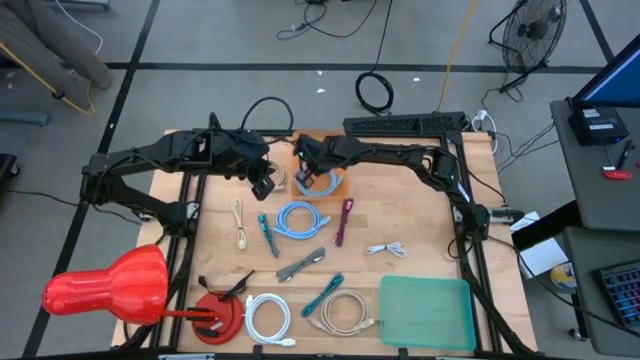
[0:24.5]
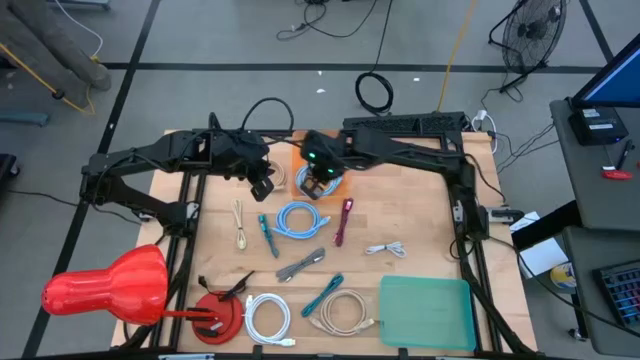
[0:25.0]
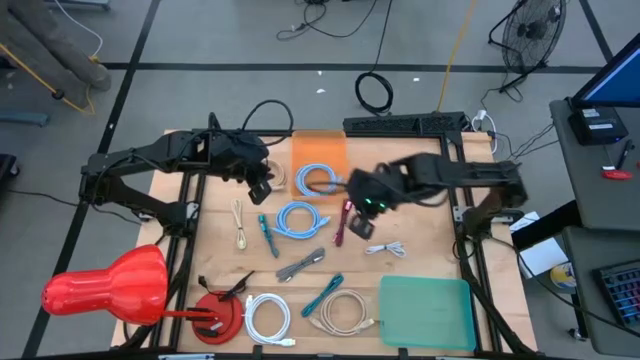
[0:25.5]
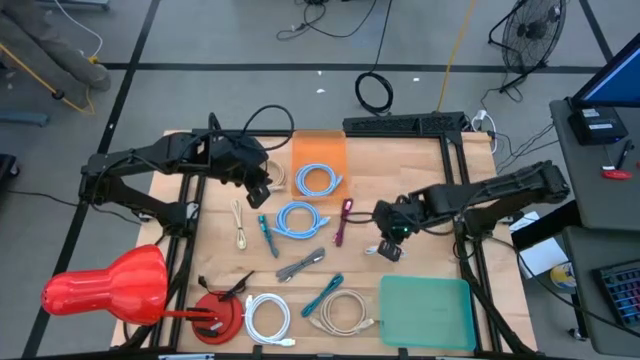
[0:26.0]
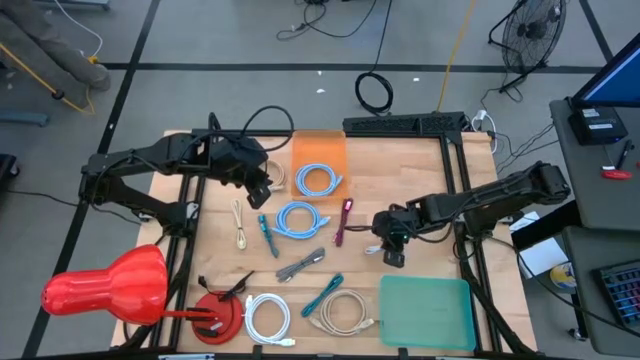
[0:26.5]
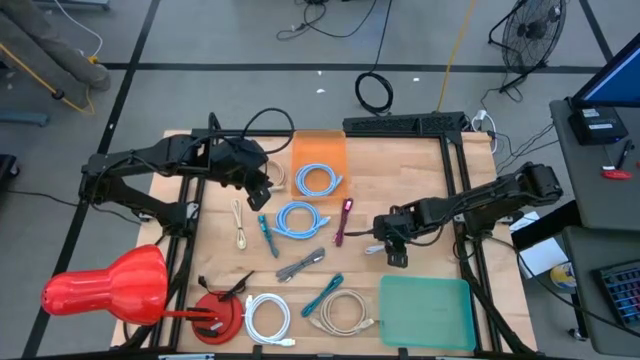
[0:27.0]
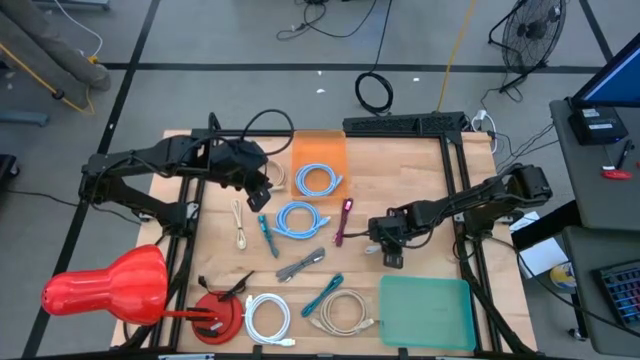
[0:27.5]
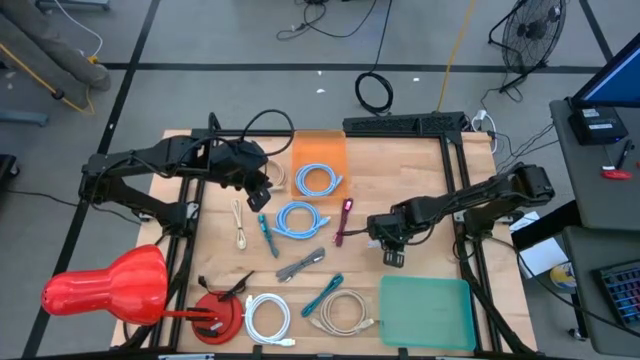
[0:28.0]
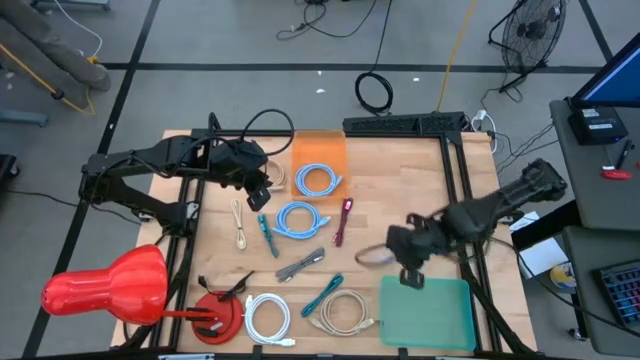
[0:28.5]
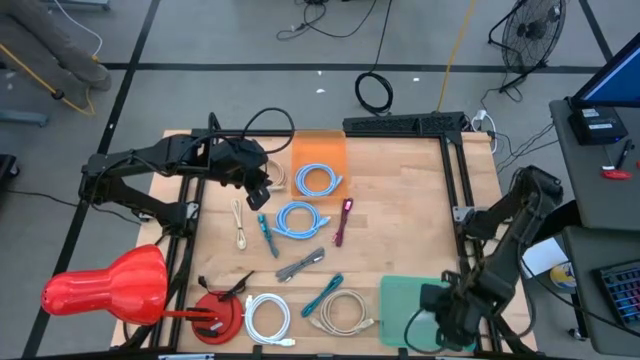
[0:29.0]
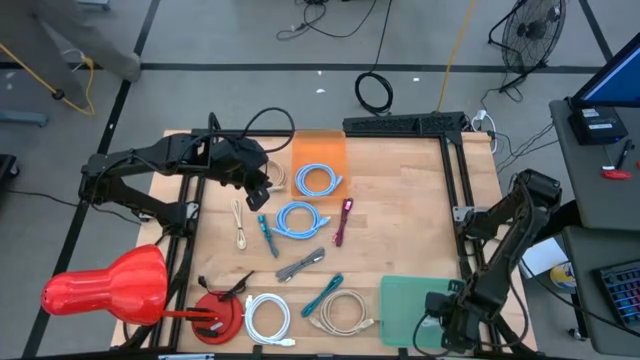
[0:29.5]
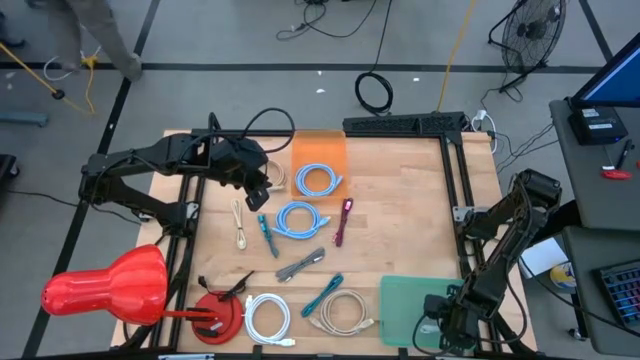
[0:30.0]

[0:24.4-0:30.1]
Task: Pick & Place USB Port
Put the top white usb cable into the blue bin

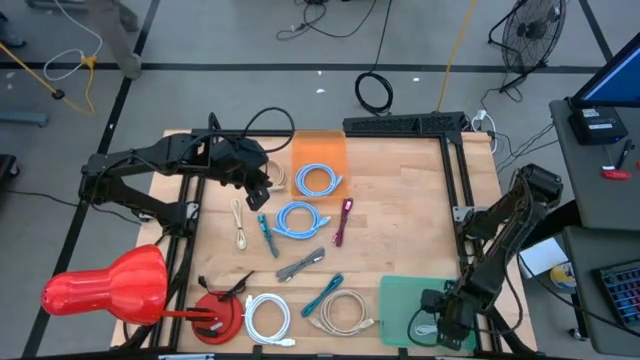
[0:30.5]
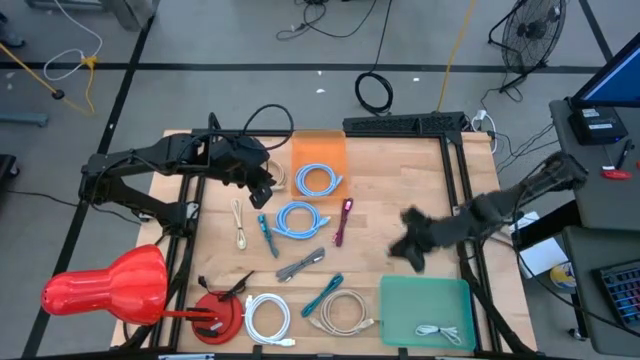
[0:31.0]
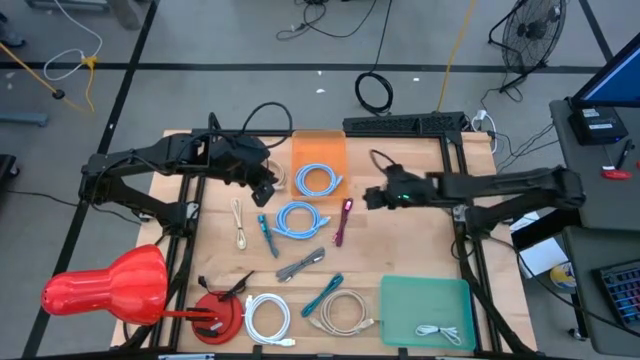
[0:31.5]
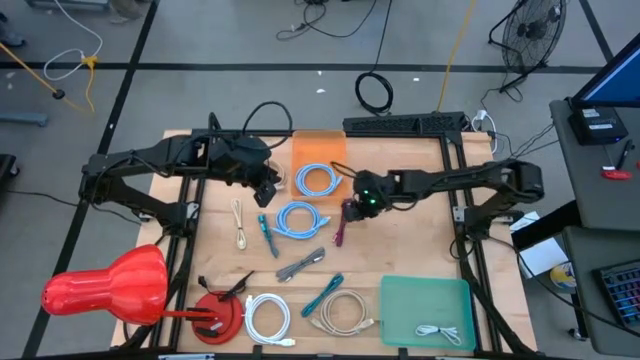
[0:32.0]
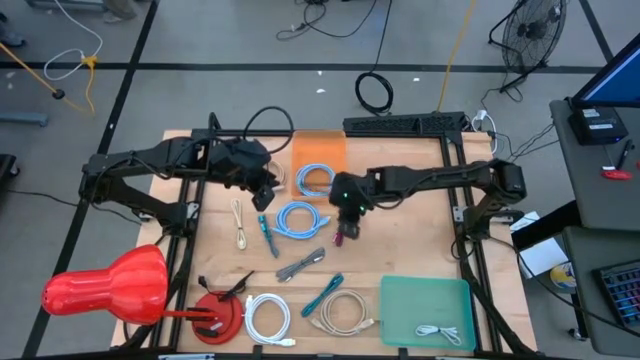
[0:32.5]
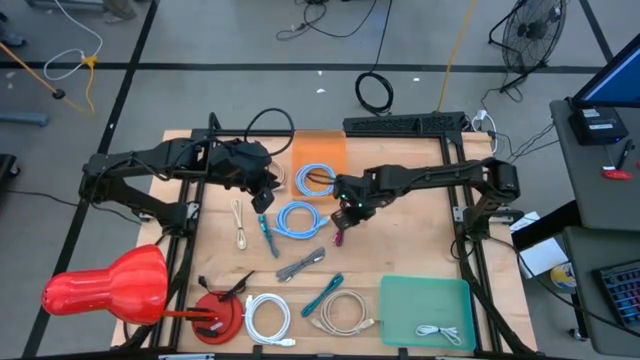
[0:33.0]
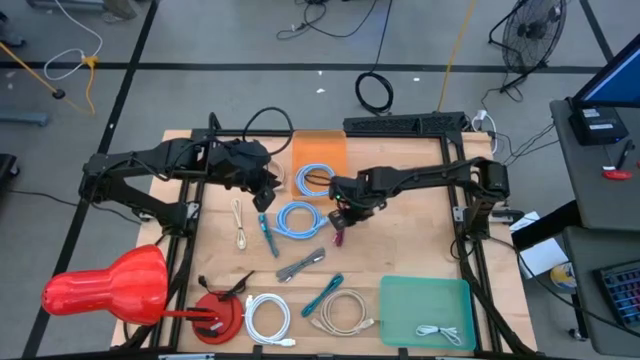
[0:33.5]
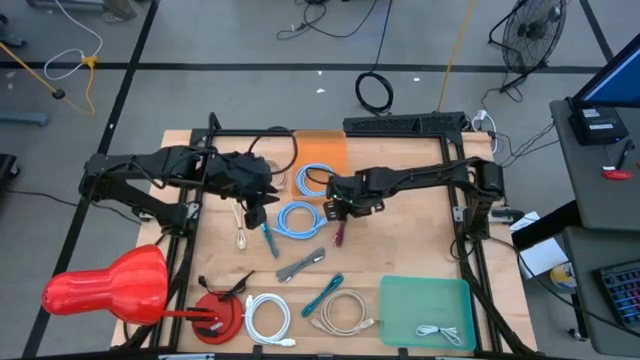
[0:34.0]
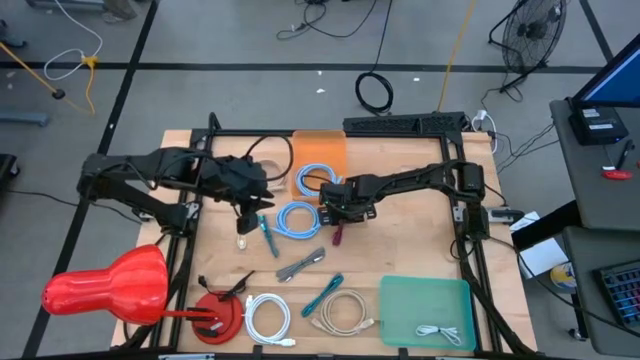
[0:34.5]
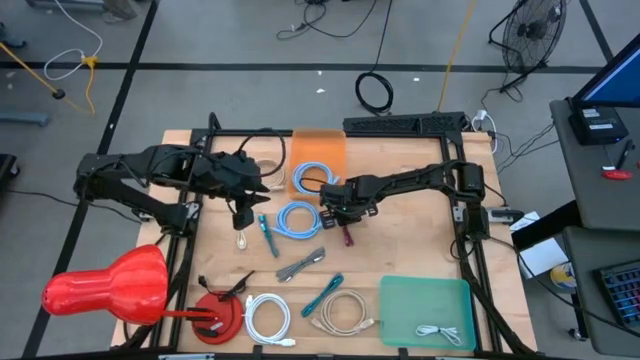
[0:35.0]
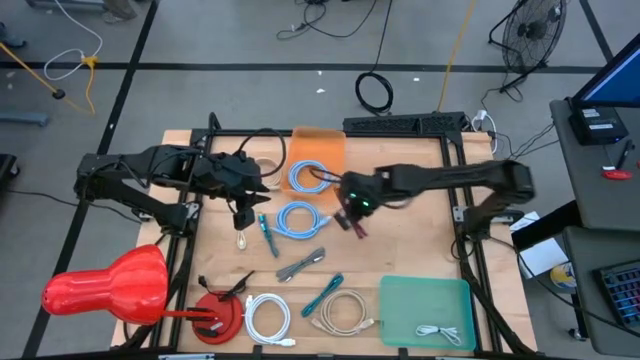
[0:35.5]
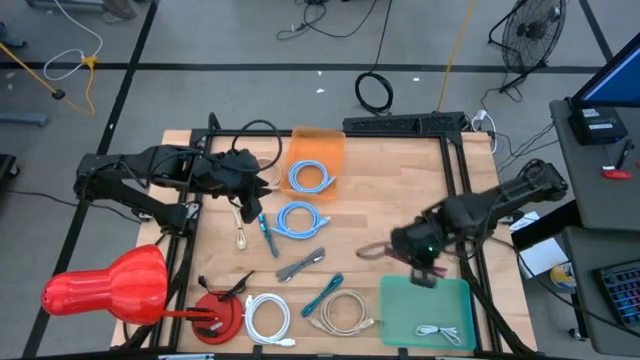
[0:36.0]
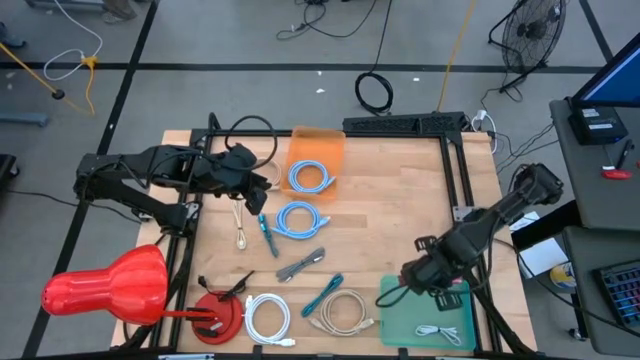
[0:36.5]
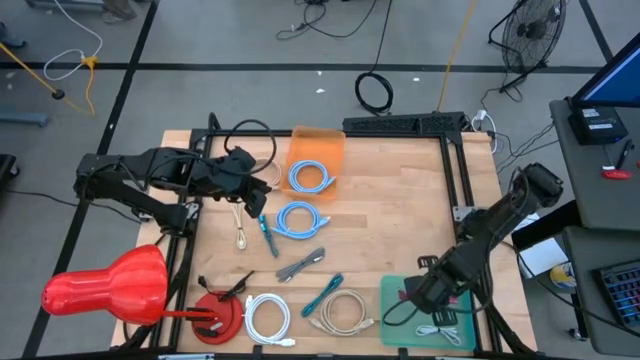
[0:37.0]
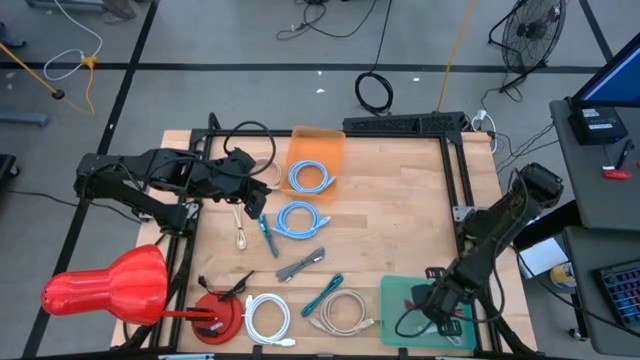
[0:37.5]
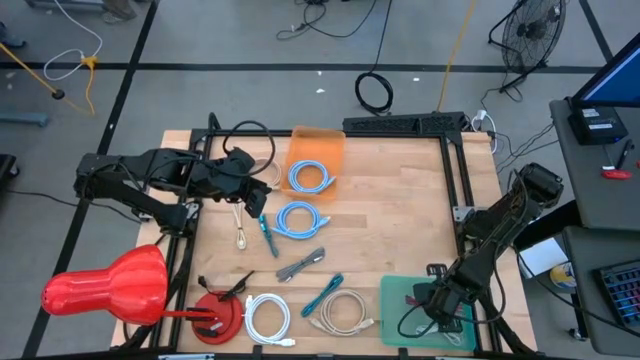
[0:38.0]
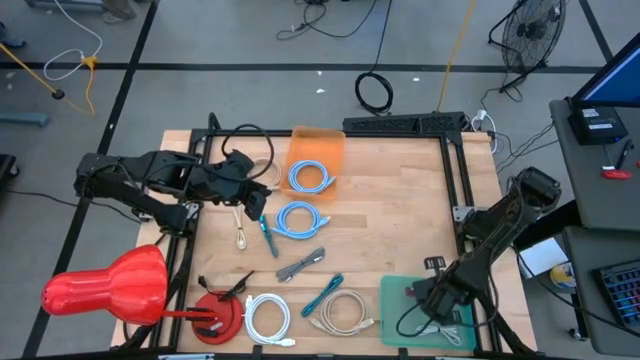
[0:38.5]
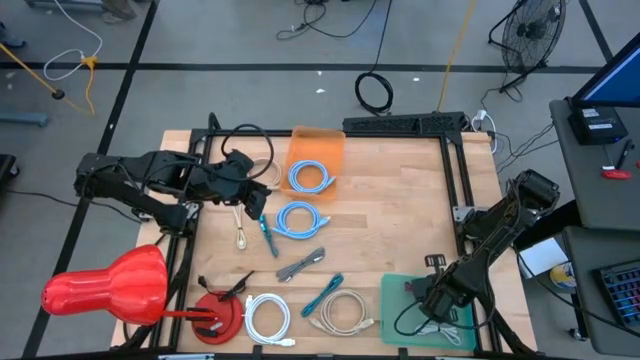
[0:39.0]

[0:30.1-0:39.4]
Put the pink patterned usb cable into the blue bin
